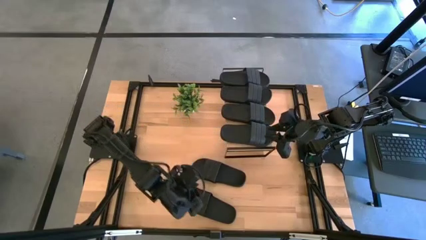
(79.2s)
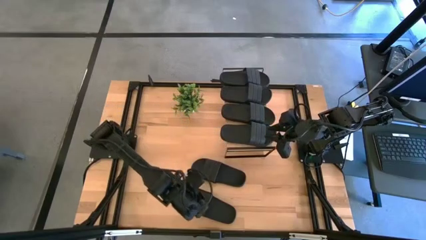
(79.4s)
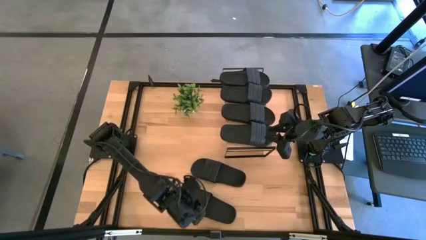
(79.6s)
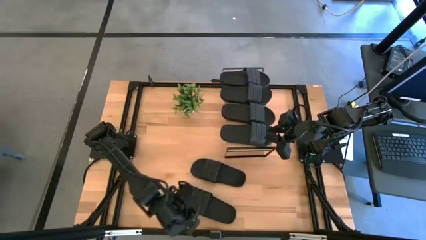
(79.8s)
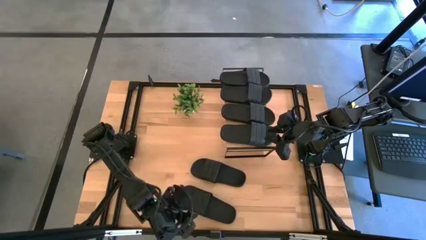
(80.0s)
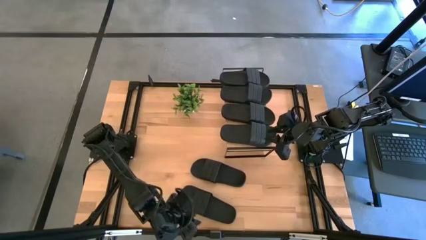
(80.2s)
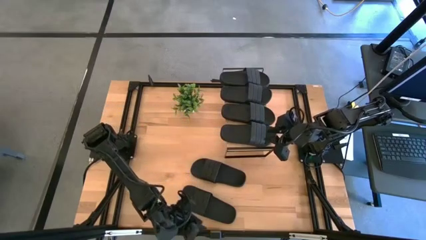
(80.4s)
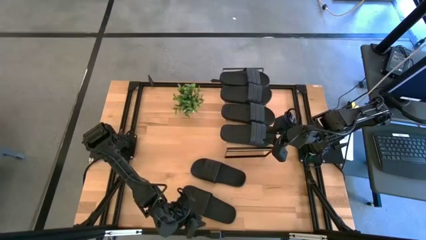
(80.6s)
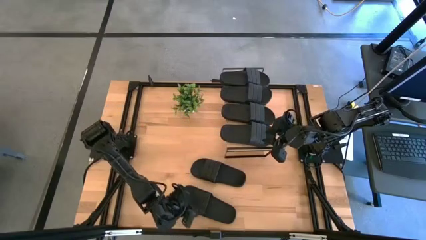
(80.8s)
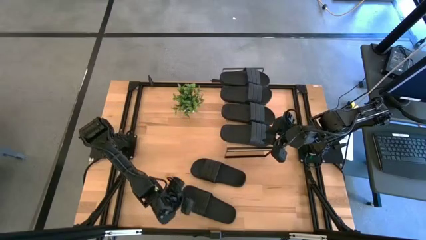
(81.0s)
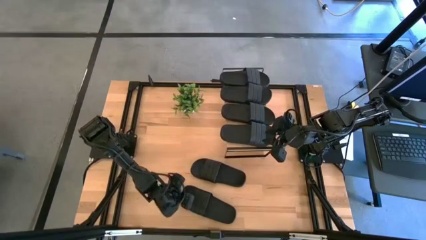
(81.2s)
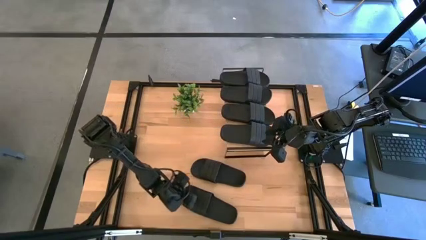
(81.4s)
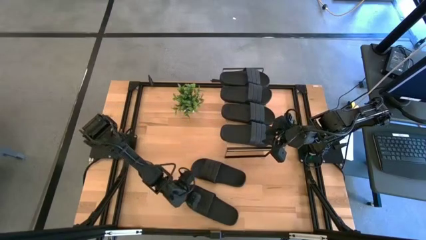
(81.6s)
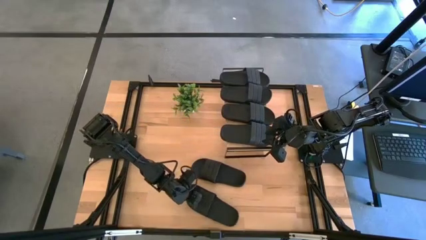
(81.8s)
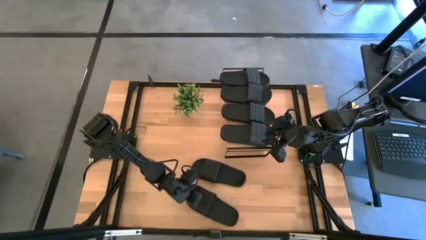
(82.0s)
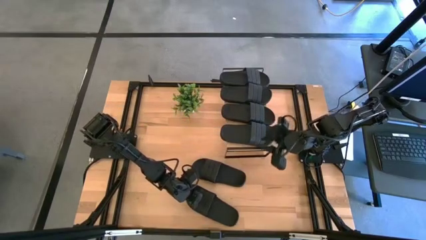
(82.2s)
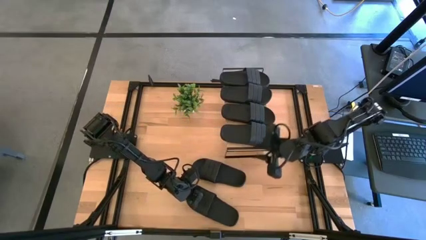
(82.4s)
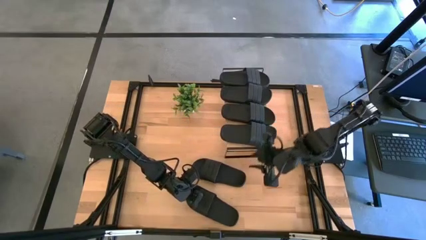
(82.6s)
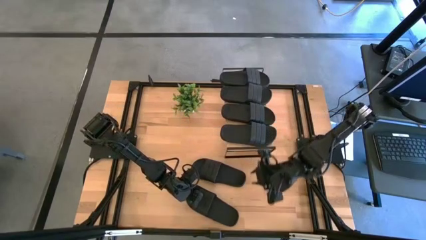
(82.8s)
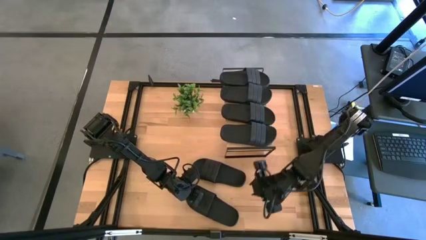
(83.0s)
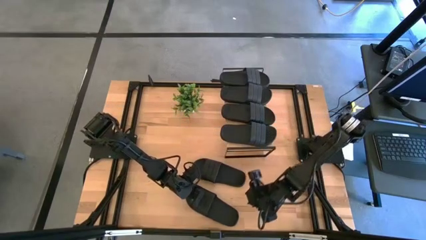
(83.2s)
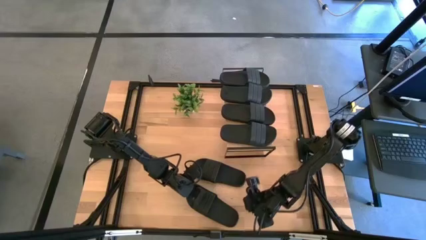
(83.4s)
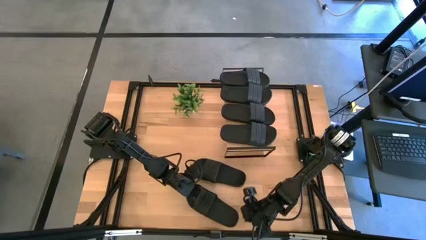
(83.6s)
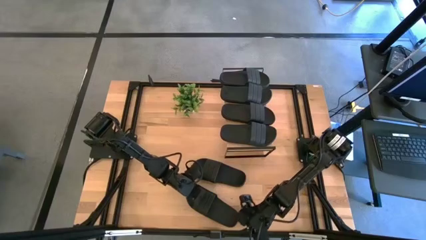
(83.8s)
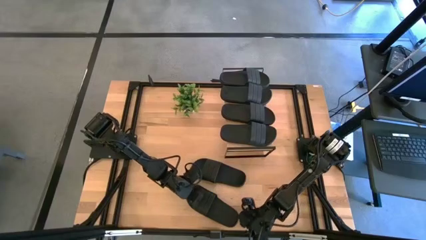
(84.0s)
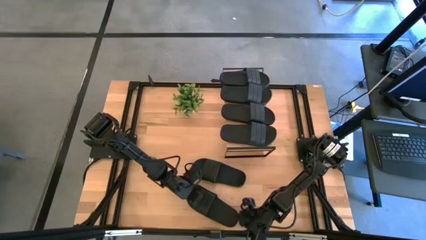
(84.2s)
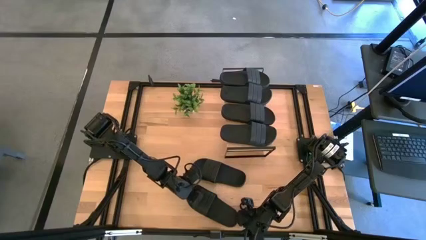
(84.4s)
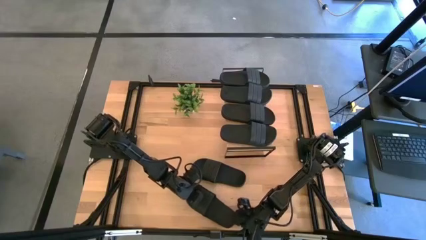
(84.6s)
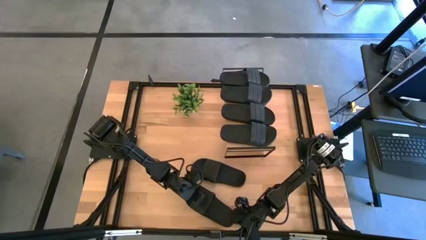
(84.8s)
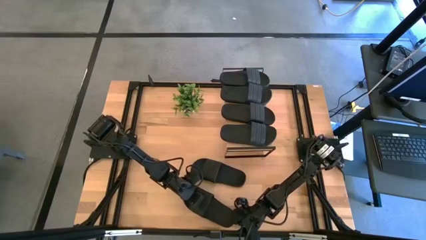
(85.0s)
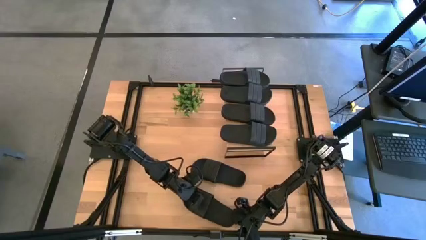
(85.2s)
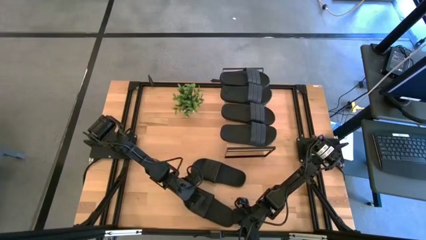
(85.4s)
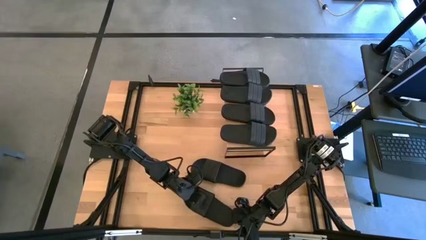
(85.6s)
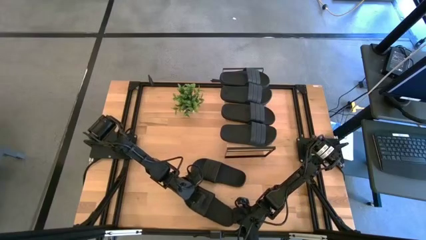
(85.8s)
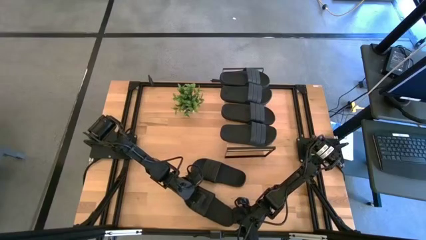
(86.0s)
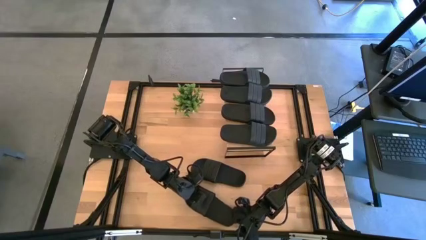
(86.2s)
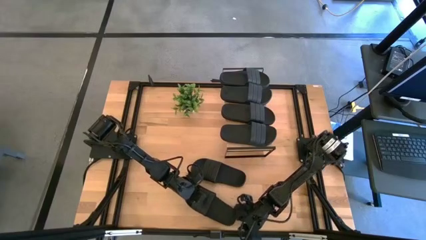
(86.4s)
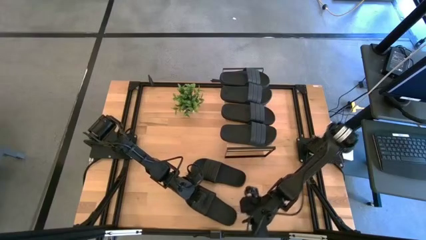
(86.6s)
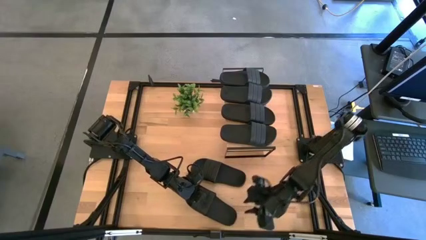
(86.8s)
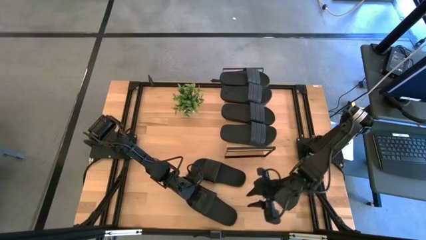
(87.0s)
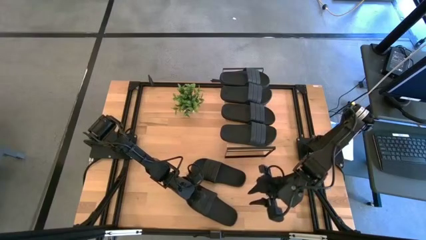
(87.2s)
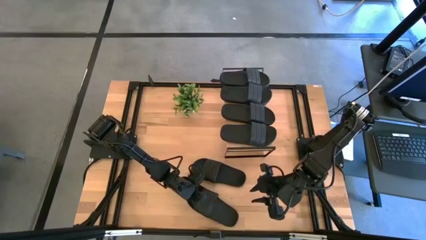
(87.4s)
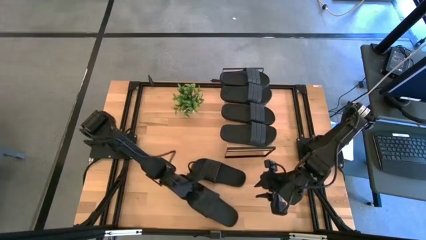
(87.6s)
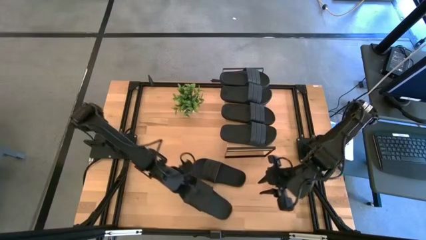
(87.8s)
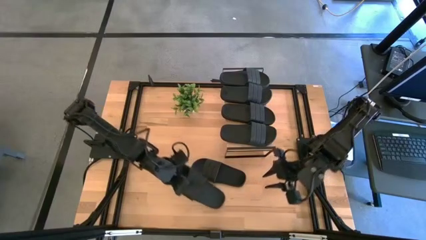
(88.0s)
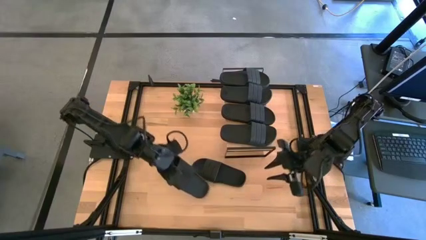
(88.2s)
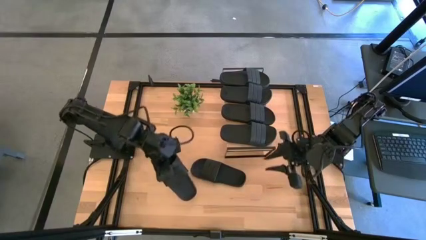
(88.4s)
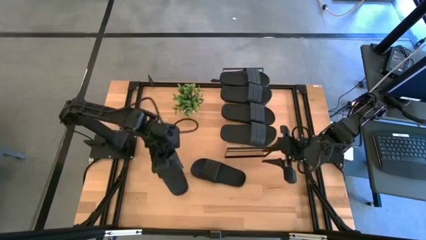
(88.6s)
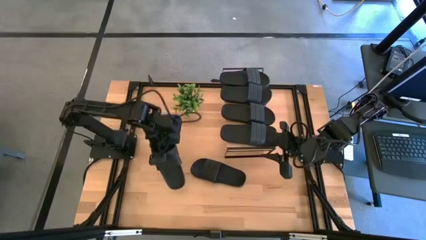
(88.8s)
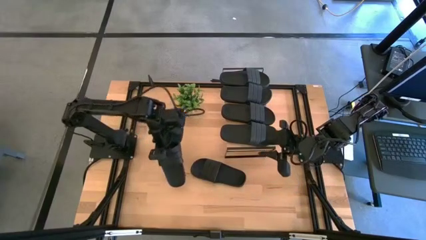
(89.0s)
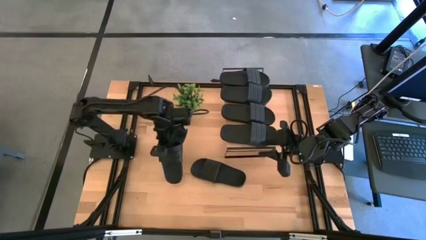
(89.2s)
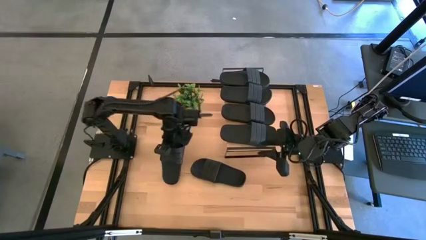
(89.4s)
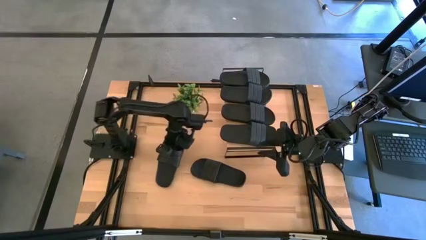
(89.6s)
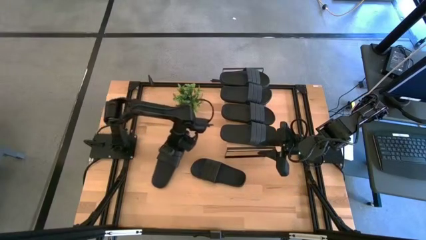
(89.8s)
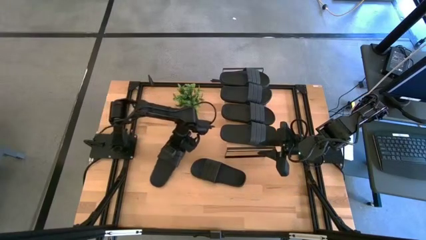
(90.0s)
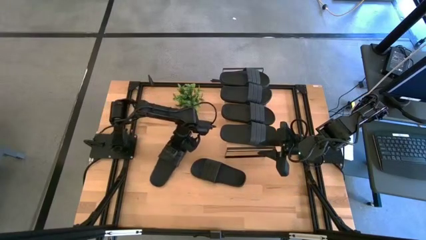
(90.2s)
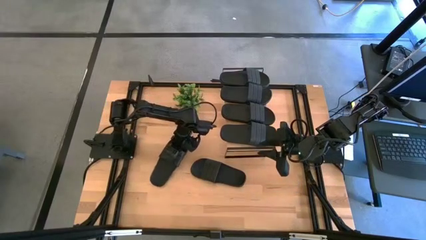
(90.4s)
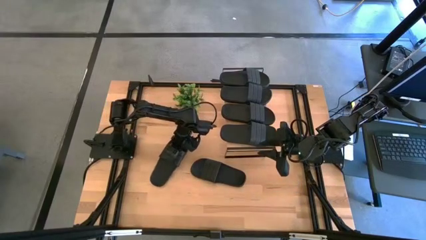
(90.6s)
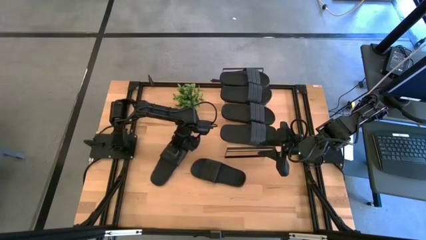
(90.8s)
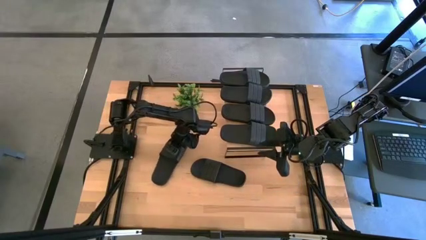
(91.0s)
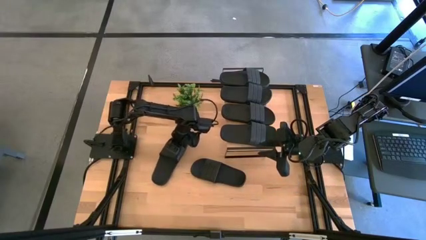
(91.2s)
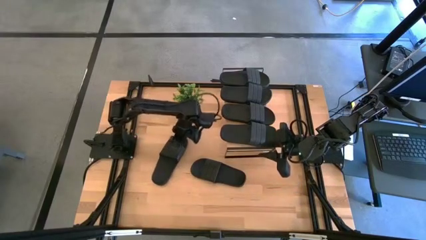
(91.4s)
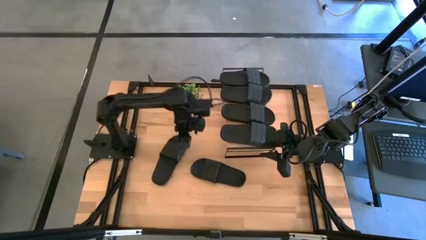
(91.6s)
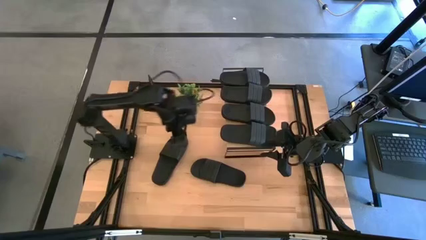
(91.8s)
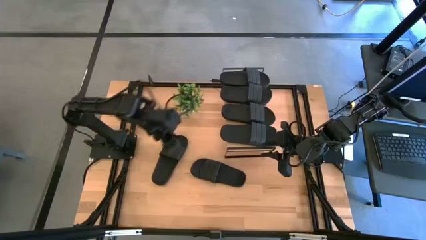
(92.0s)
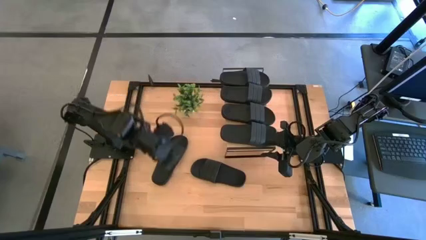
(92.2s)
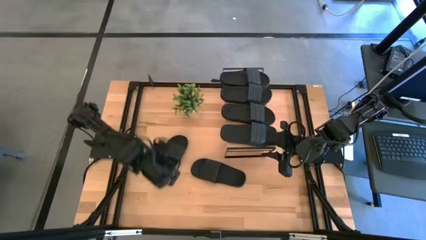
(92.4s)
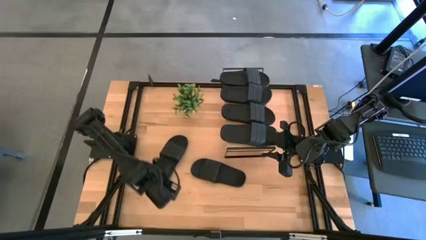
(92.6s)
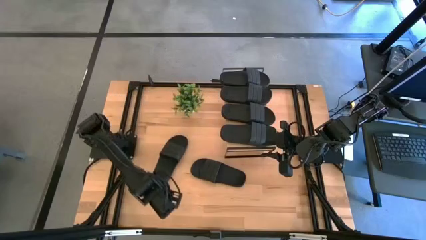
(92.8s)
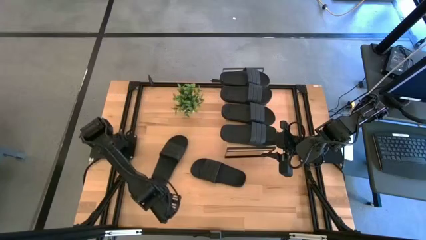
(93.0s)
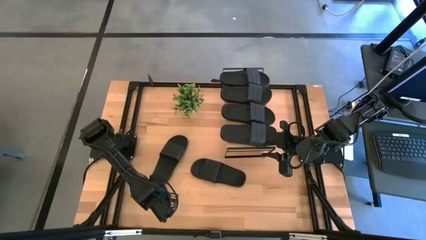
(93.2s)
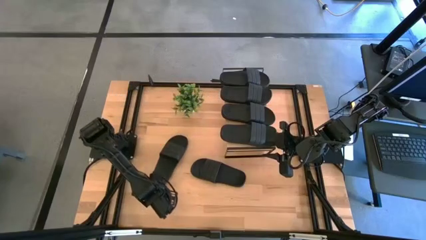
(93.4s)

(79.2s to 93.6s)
Task: Pick and place slides into the shelf
Put the black slide under the shelf
